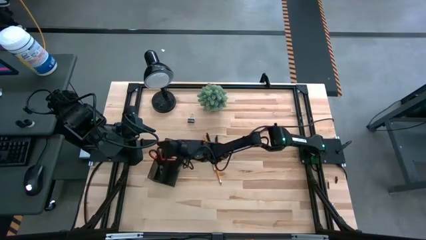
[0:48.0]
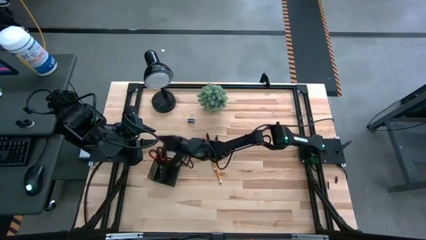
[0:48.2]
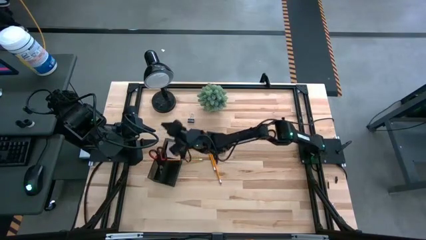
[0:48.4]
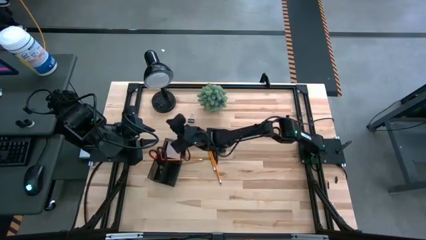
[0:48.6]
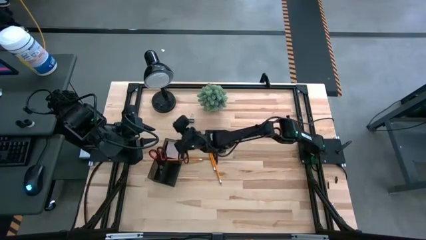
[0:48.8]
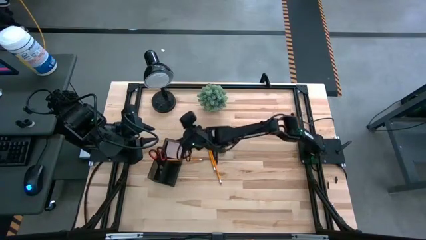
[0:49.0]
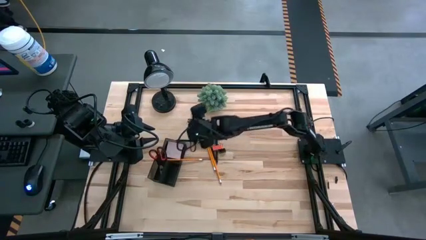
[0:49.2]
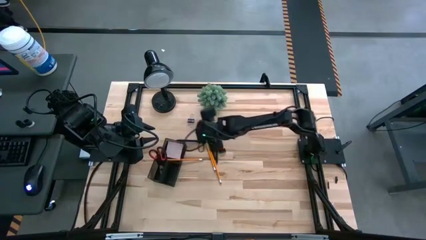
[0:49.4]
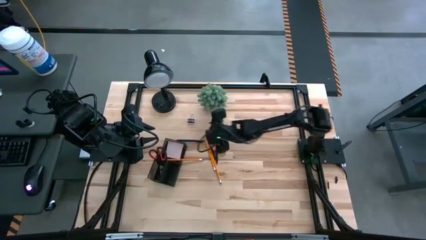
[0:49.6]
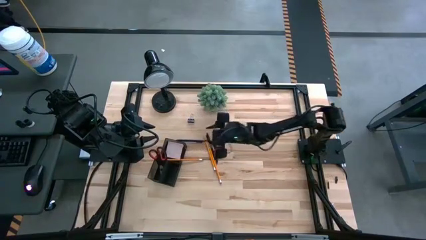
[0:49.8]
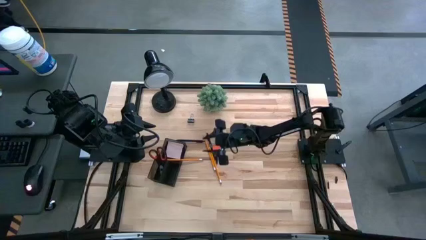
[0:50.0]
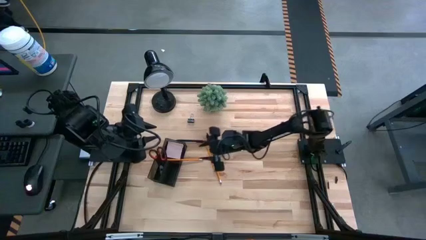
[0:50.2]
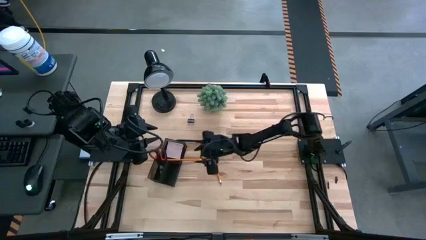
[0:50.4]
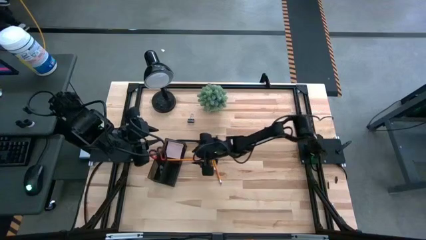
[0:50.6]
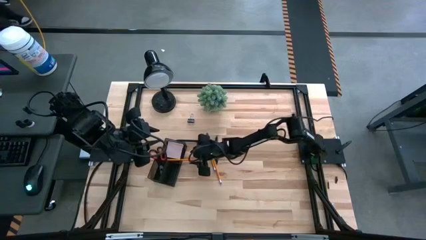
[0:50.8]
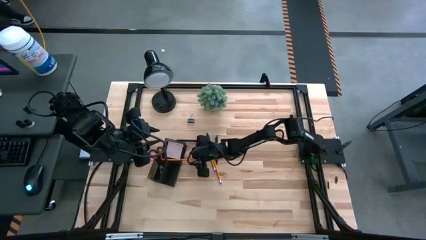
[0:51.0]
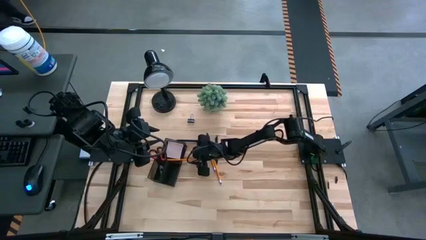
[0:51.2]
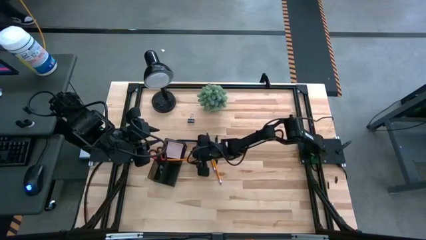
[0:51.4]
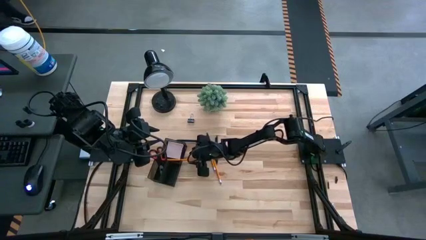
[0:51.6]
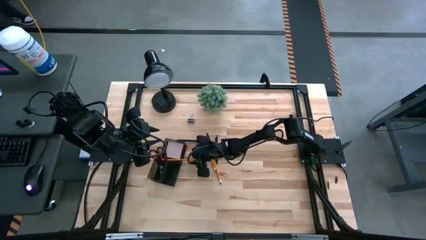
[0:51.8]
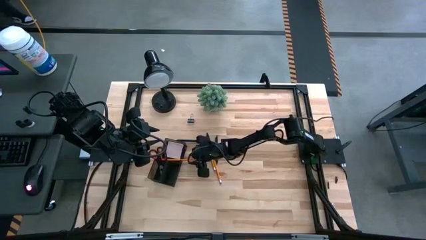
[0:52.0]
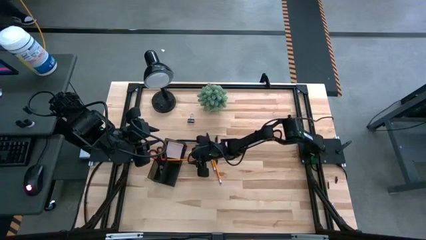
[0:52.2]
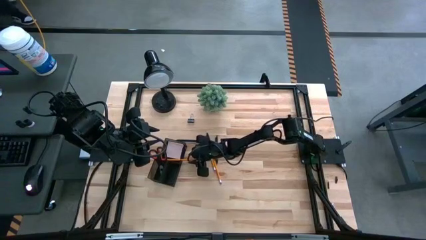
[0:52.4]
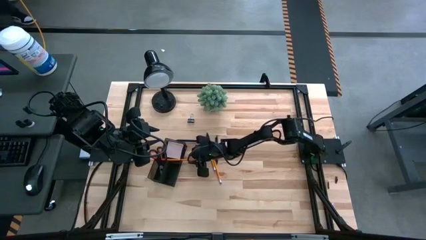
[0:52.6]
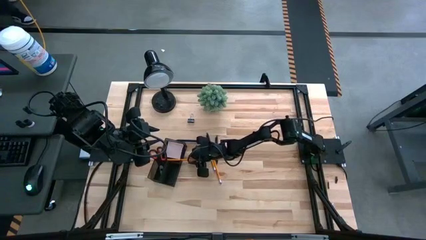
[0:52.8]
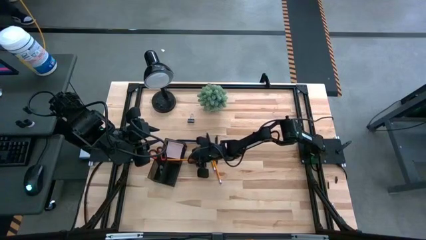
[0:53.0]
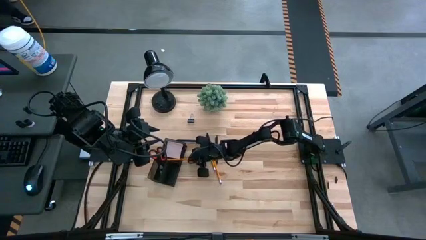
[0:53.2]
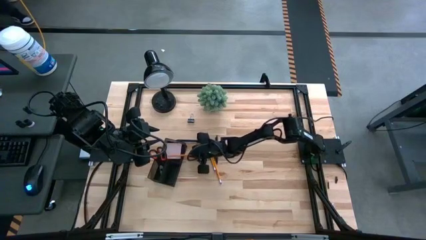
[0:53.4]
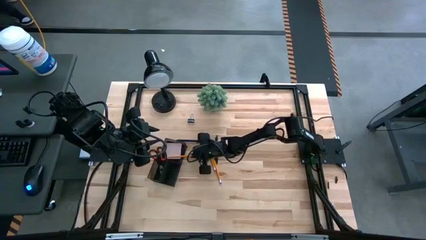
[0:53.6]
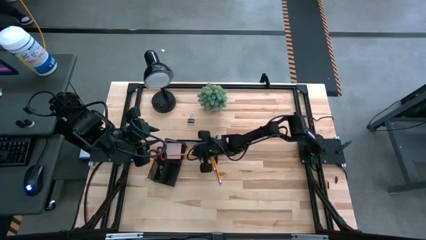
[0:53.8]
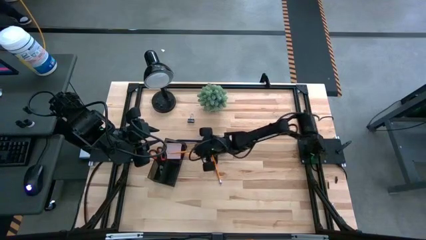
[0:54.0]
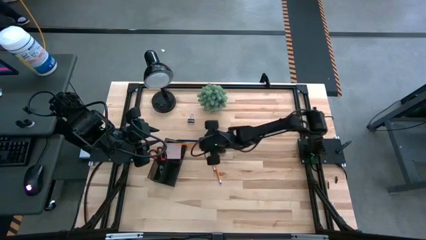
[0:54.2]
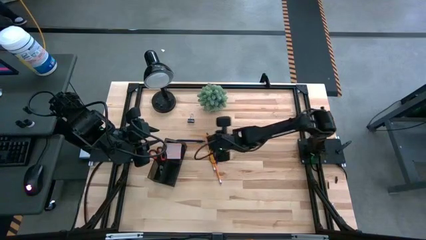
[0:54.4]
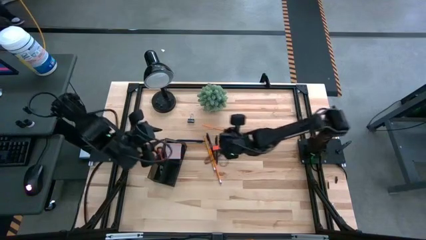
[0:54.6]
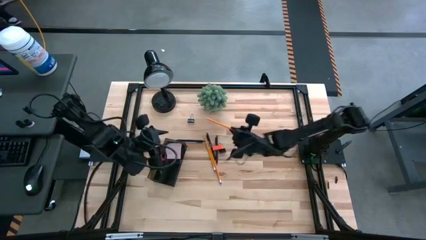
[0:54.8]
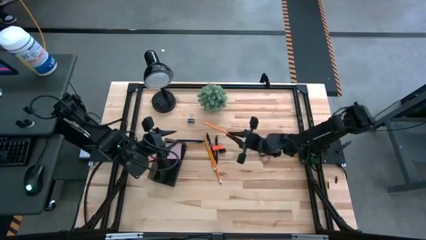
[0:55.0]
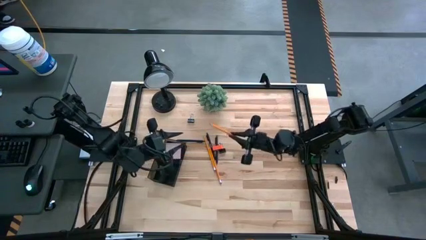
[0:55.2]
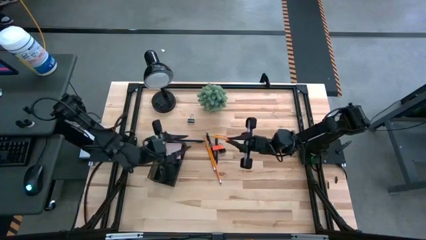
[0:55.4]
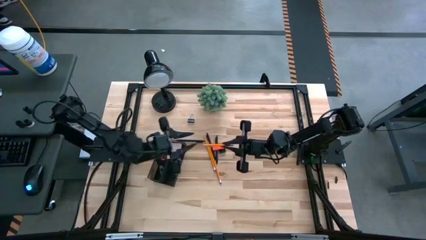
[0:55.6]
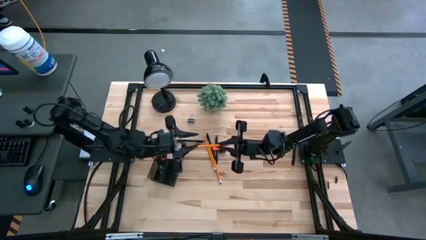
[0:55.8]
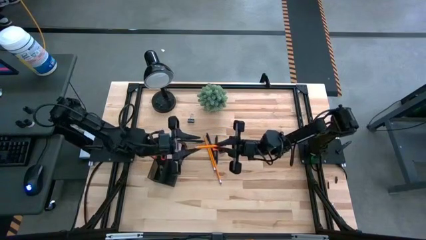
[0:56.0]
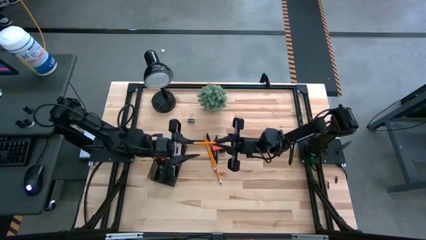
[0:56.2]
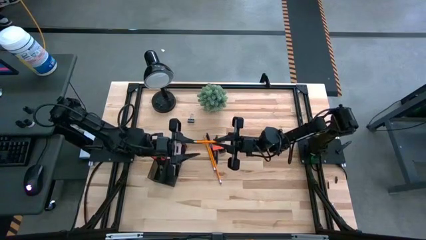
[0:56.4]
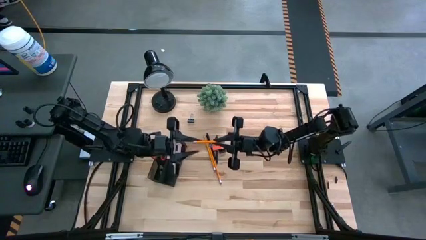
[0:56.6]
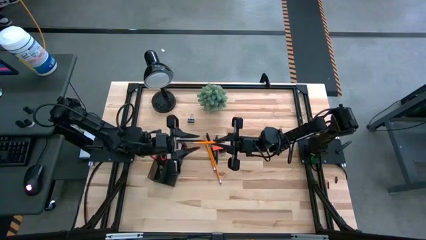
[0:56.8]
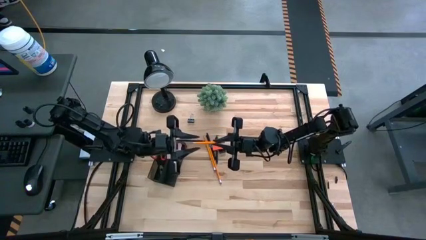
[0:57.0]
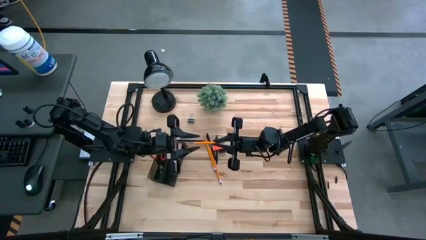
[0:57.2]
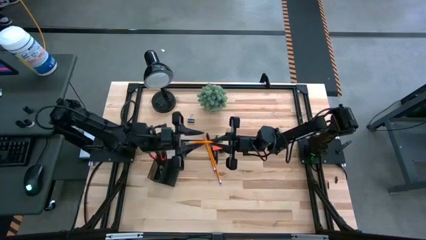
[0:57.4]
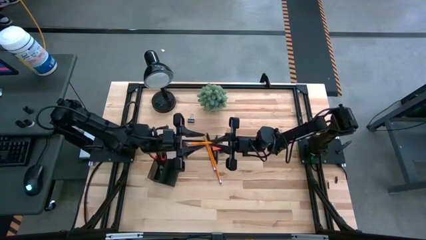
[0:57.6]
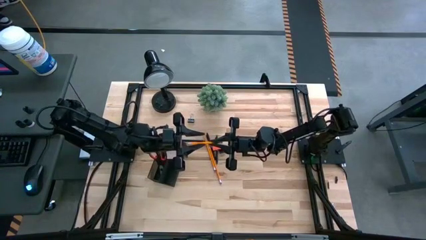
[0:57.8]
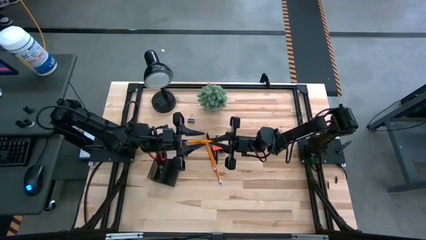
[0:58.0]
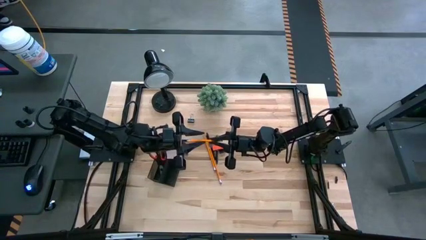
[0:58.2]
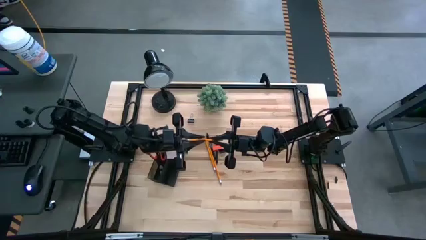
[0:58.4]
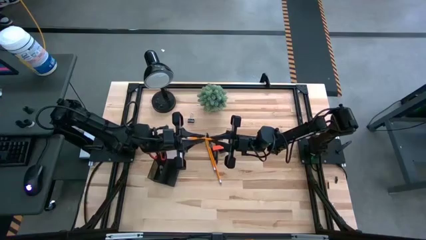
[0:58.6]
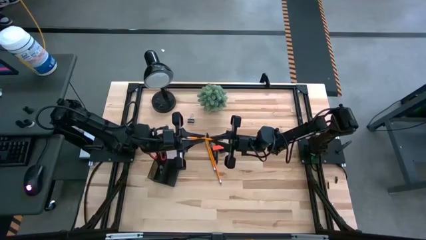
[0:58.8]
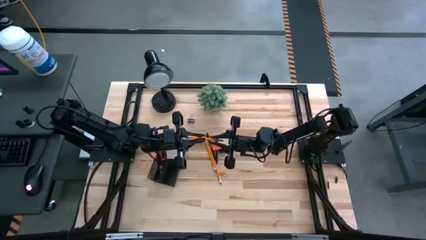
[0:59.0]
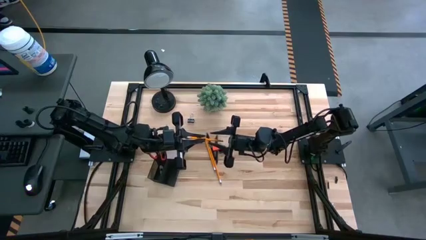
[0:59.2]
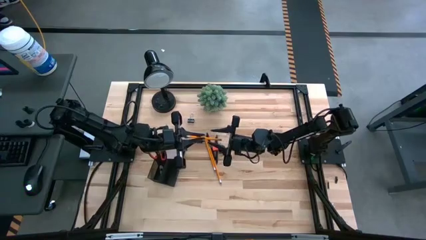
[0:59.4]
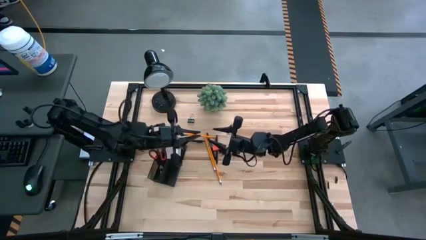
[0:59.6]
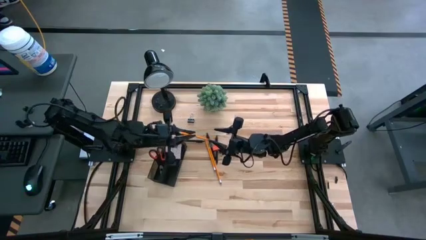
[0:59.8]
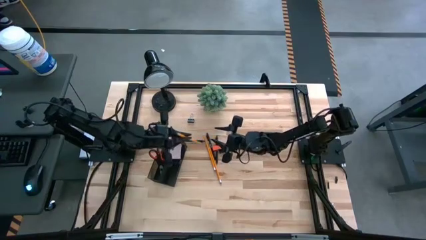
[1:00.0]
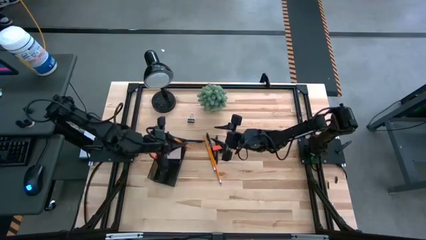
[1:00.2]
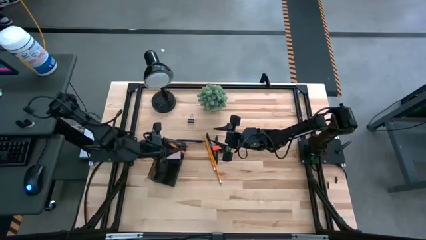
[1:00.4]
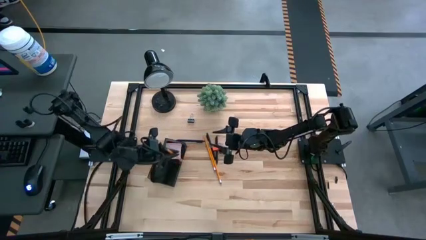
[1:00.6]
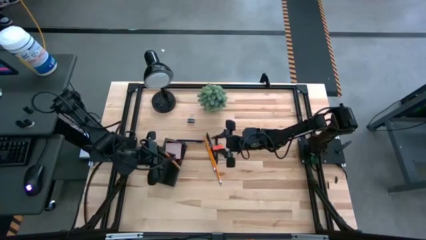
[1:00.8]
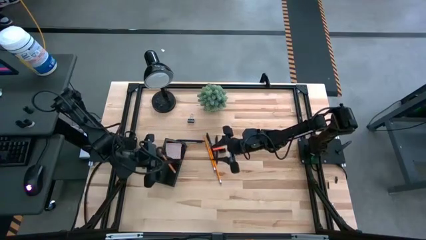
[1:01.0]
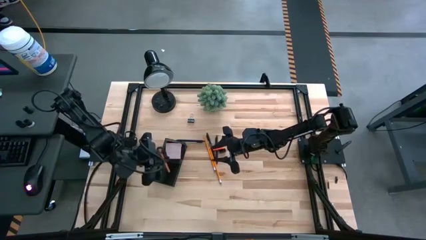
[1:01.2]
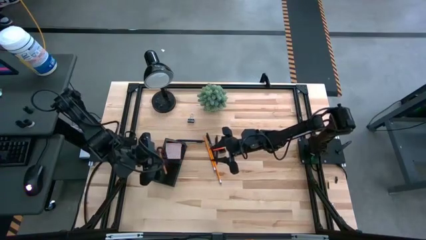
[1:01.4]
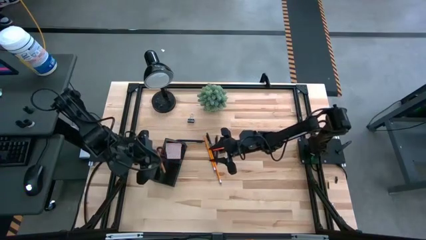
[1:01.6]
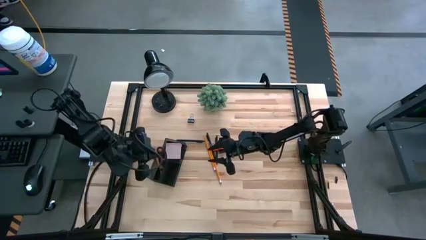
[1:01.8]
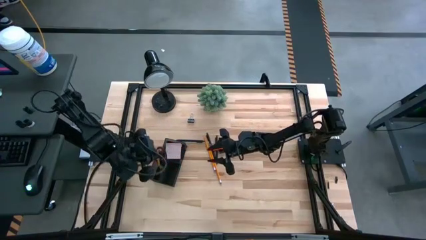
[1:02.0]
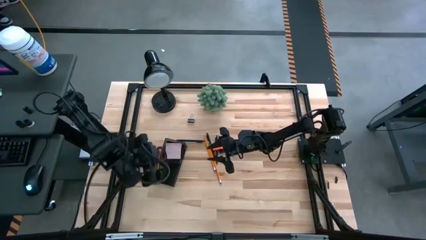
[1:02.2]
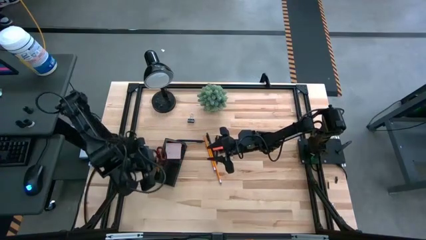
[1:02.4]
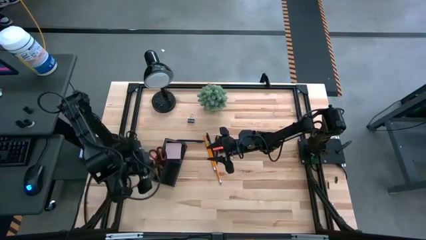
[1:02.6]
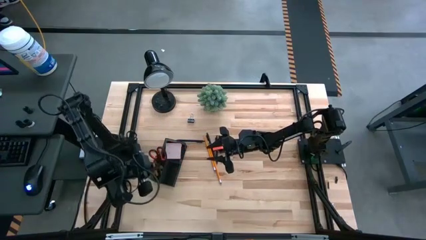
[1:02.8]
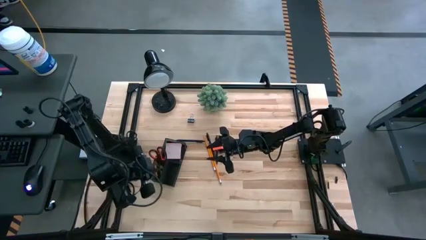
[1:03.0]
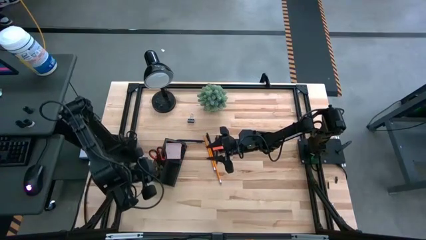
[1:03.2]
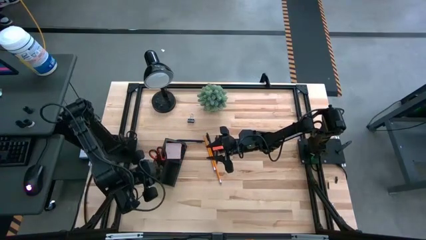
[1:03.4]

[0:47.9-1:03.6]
Task: Pick and place office supplies into organizer
Put the left orange pencil into the desk organizer

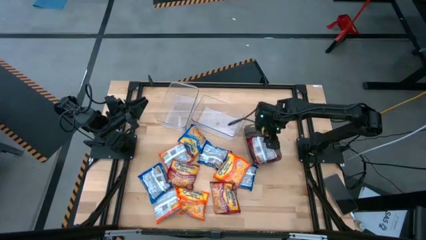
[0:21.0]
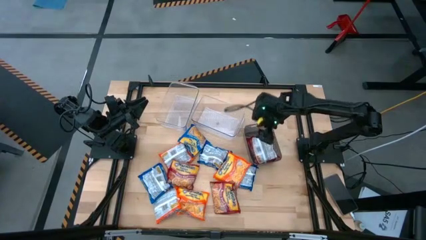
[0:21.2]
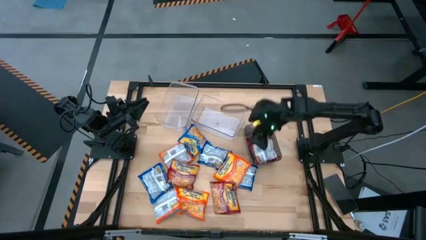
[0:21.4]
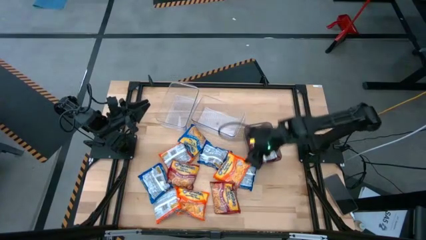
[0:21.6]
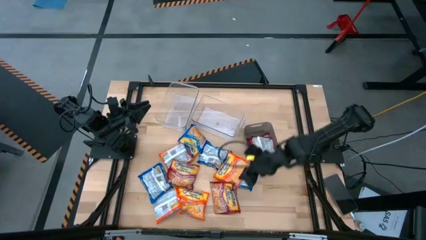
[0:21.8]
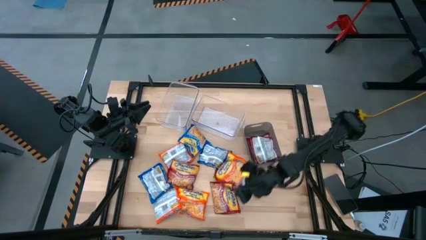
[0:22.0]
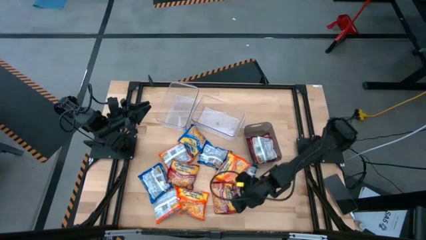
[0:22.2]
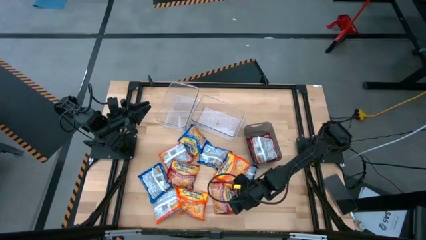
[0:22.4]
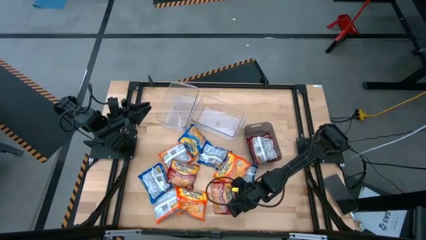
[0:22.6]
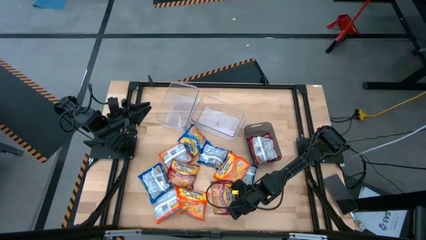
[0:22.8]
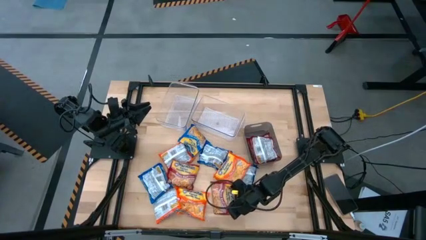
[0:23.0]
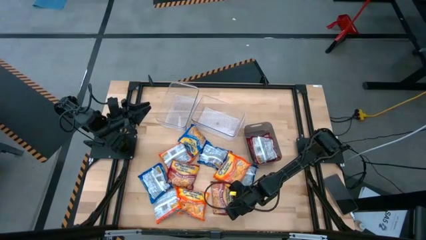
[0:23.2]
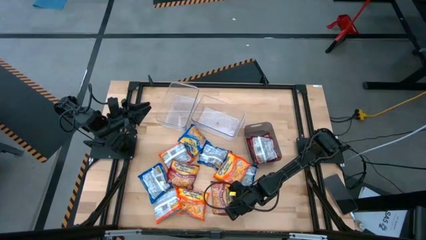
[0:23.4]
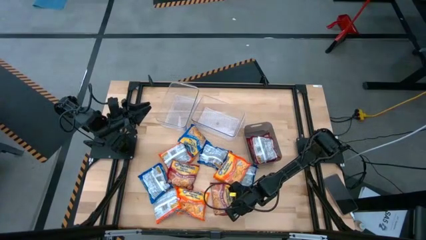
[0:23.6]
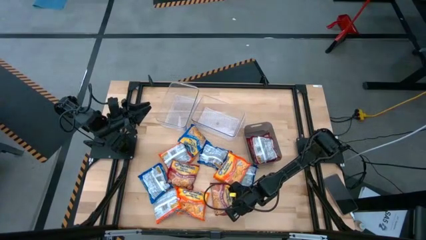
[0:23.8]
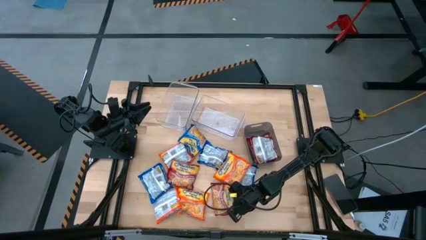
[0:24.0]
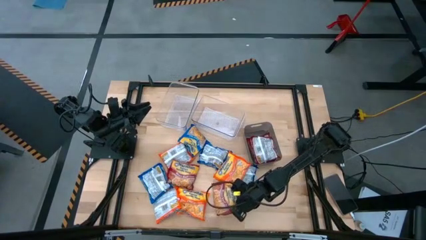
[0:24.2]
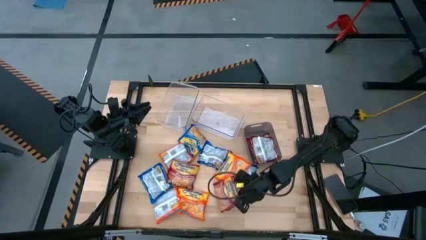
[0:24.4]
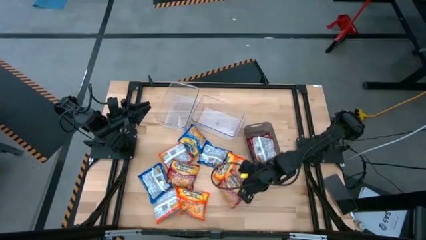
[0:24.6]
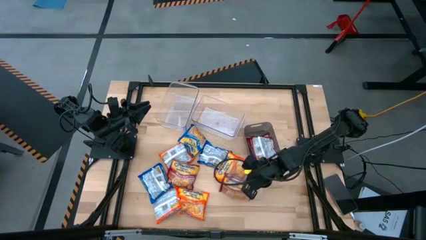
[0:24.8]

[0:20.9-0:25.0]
Task: Sort Maruchan noodles
Put the red noodle pack into the black bin
